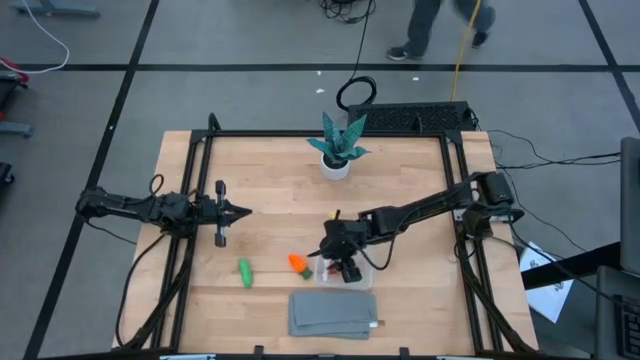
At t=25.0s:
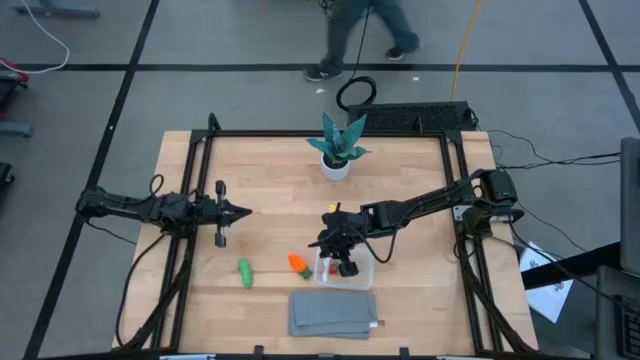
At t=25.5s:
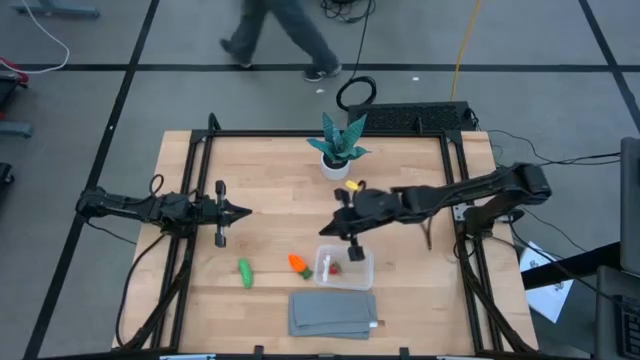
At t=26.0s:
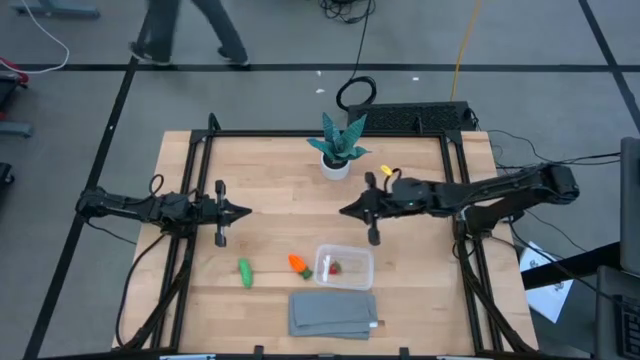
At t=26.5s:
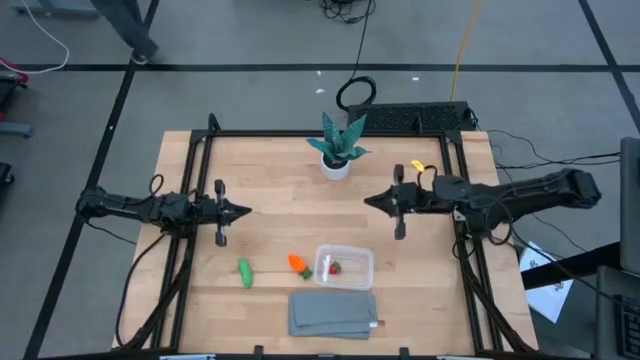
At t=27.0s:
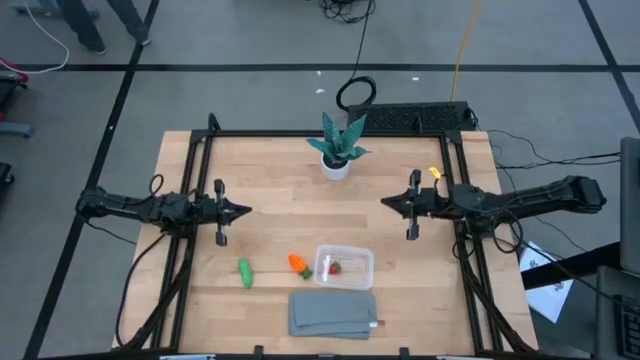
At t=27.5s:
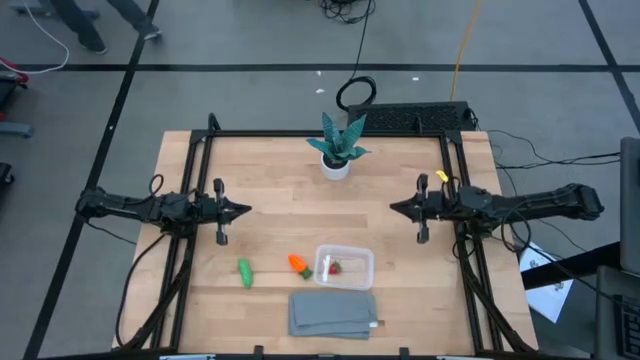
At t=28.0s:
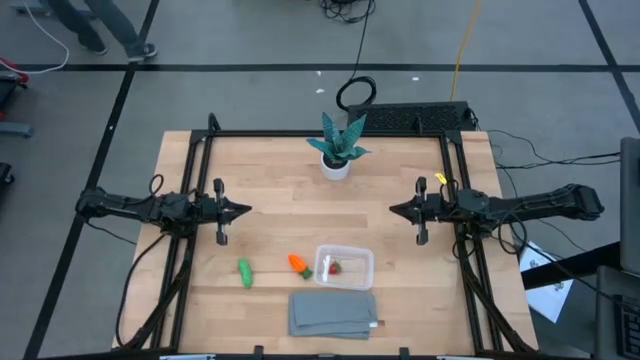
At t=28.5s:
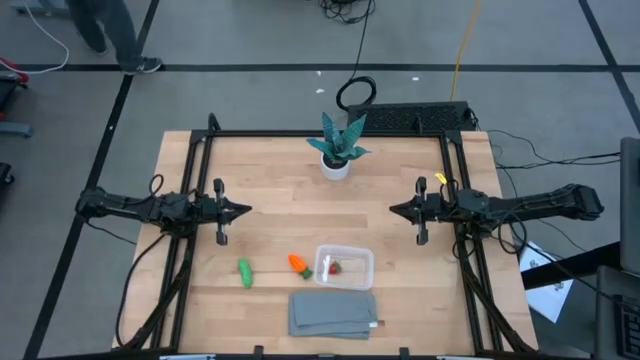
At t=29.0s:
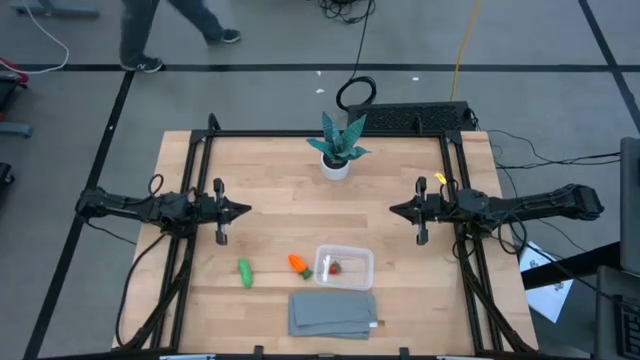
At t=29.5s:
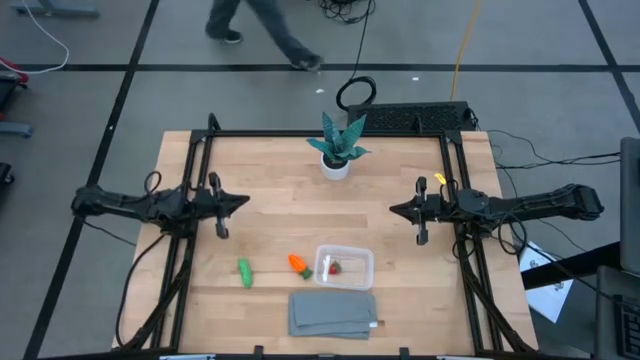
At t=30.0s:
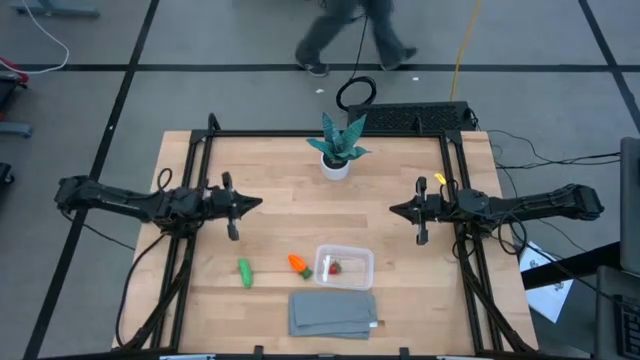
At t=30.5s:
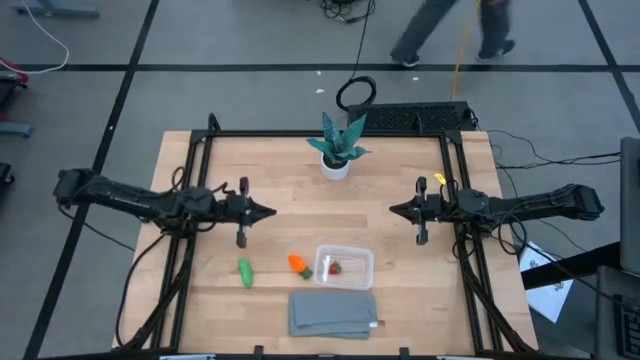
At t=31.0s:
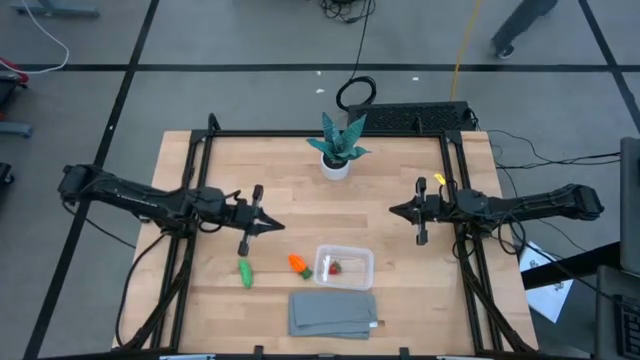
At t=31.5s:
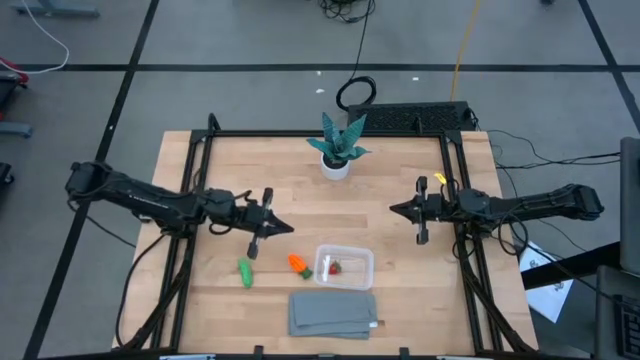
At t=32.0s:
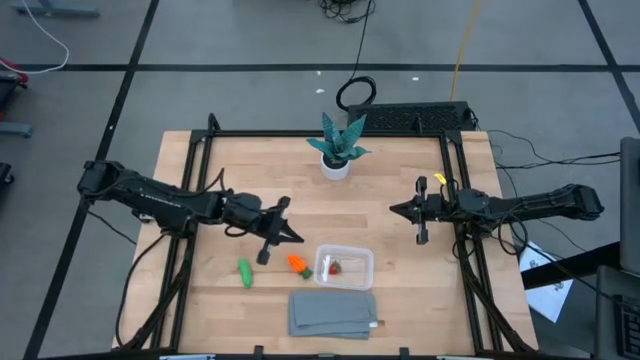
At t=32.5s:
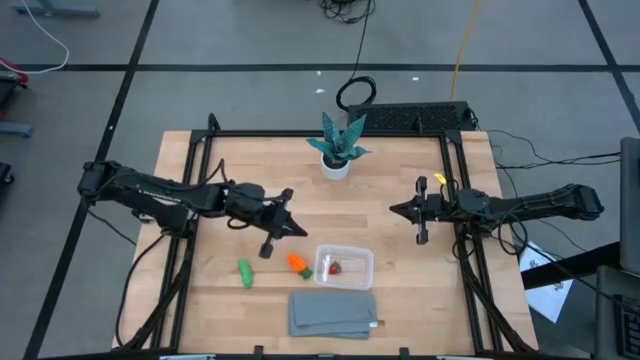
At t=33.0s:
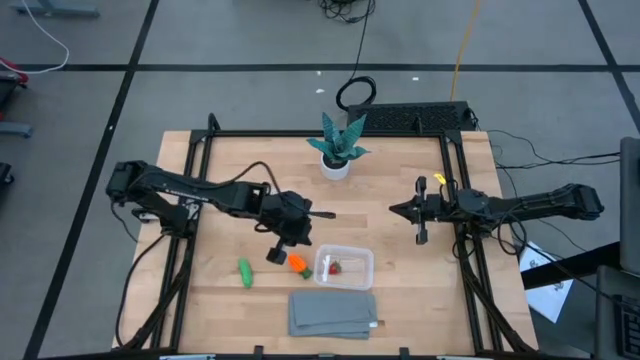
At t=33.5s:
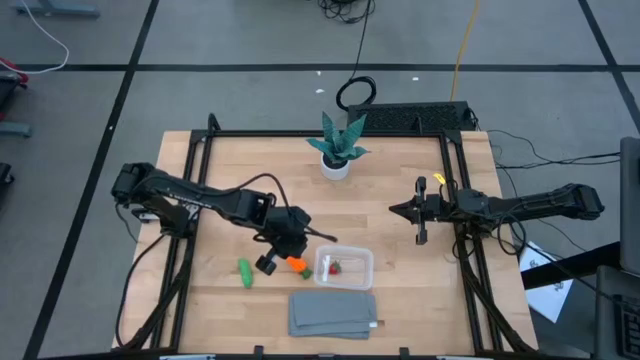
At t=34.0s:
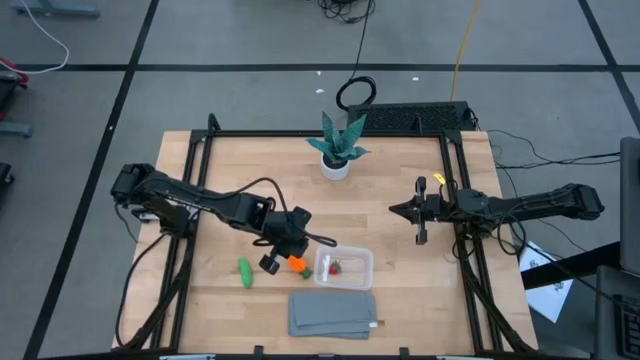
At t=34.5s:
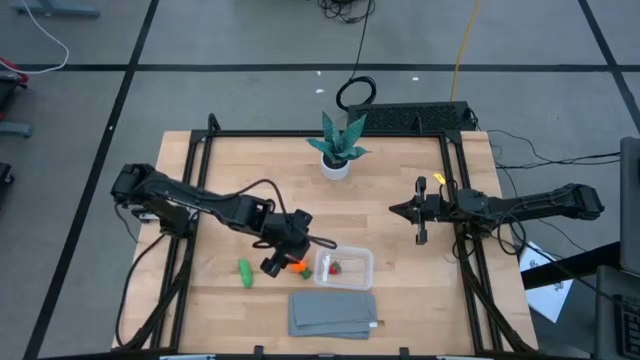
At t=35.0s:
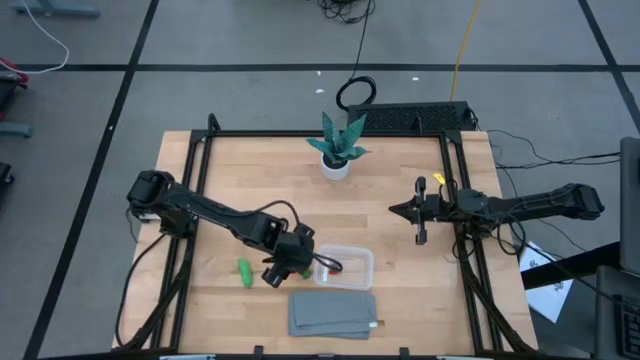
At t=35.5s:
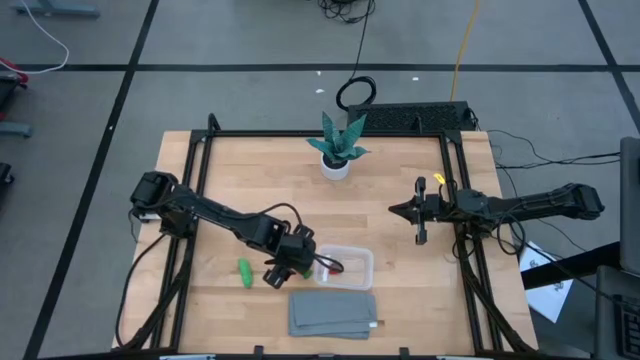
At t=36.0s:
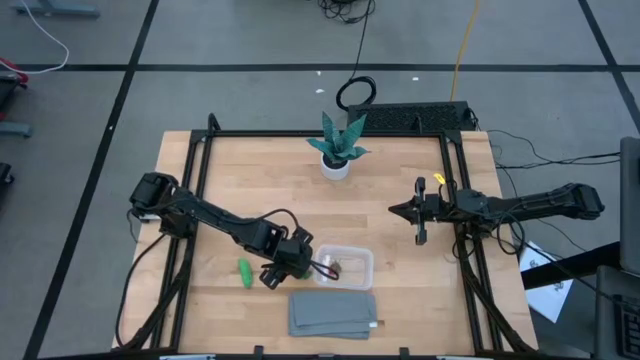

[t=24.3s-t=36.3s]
Task: Pick and placing Produce into tupperware
Put the orange carrot into the container

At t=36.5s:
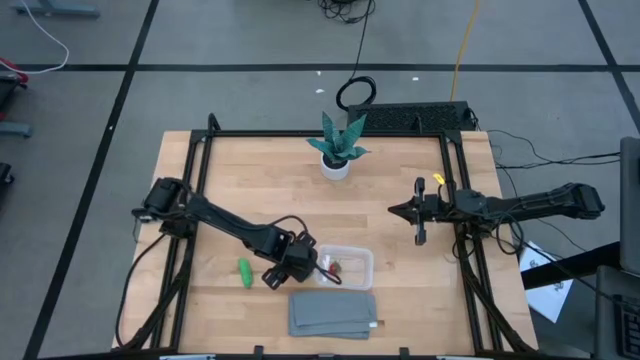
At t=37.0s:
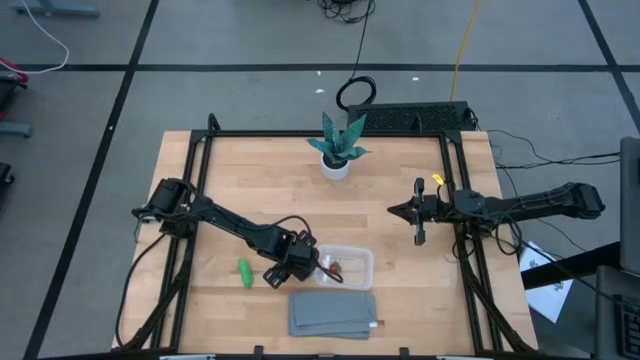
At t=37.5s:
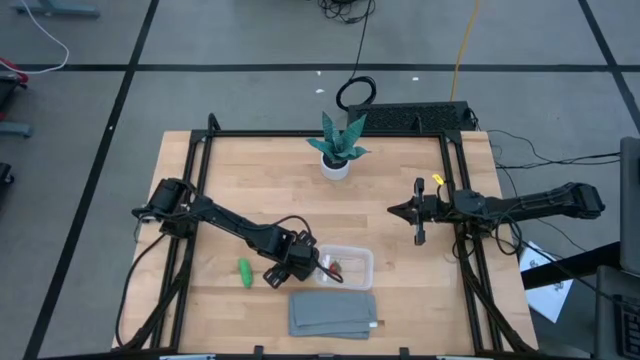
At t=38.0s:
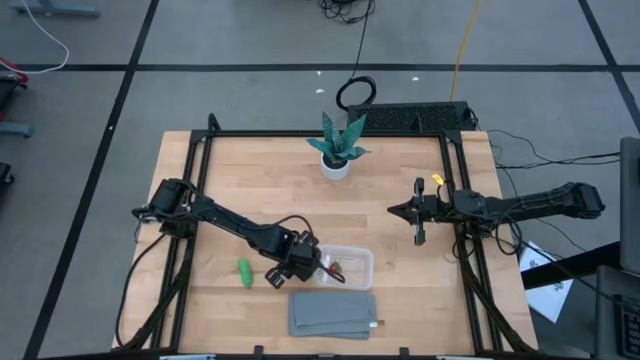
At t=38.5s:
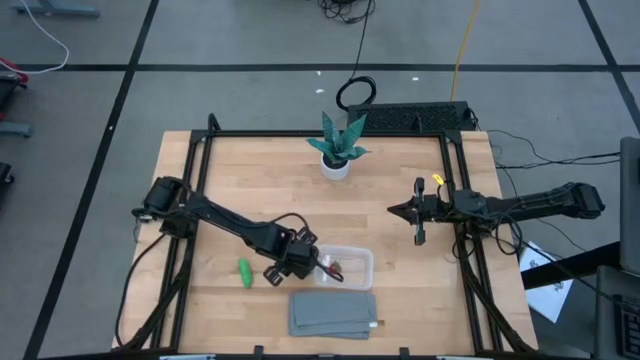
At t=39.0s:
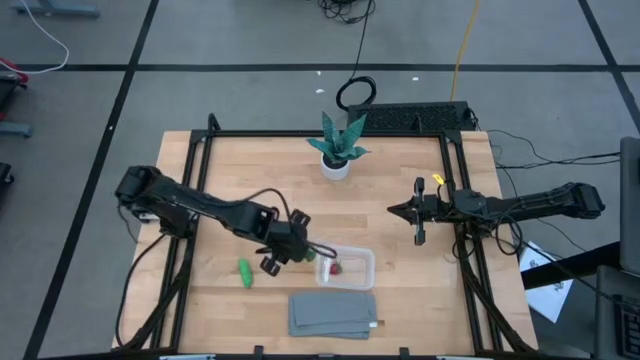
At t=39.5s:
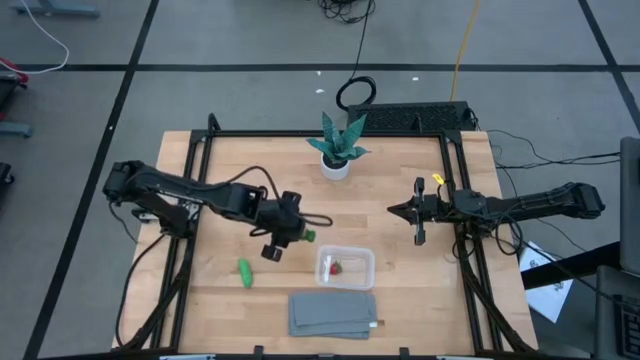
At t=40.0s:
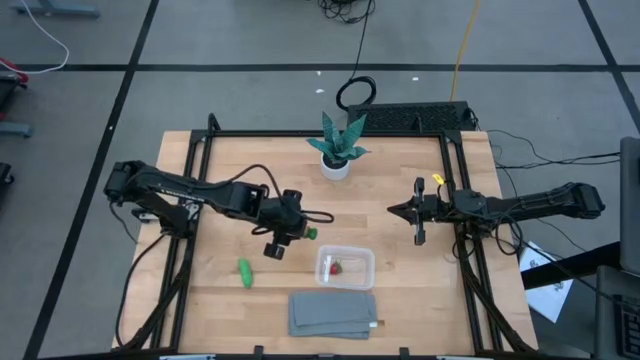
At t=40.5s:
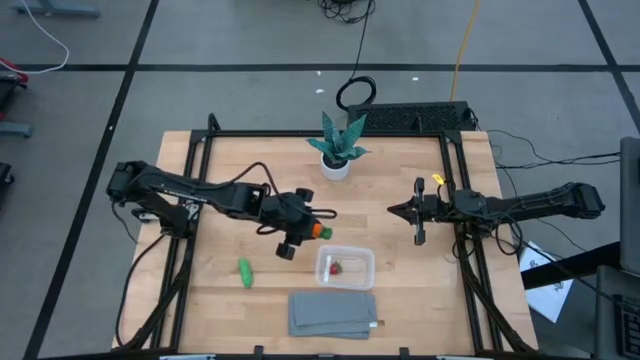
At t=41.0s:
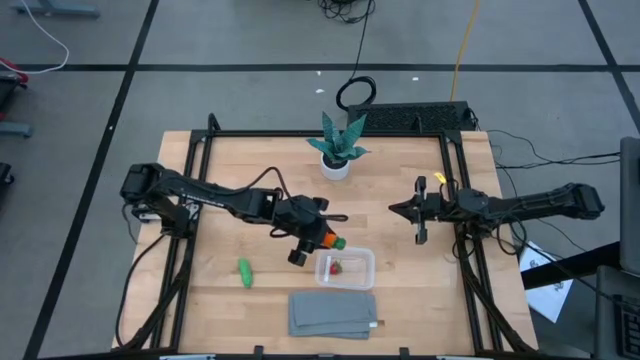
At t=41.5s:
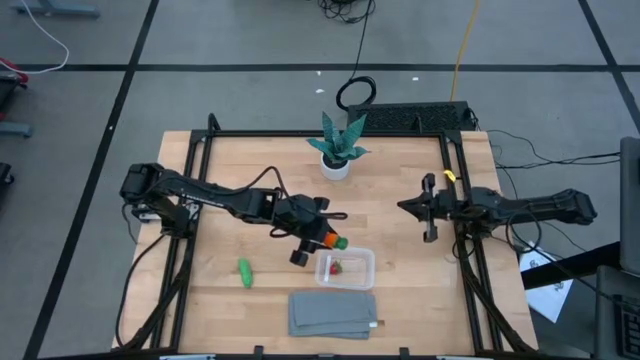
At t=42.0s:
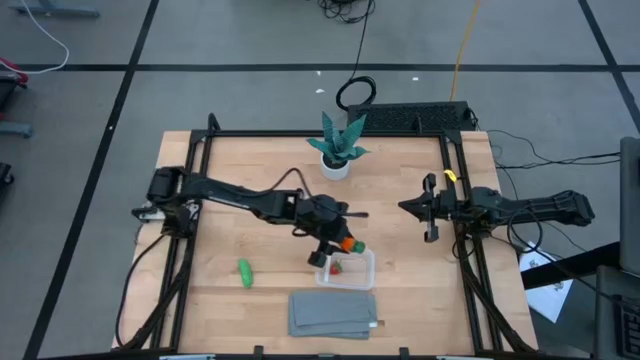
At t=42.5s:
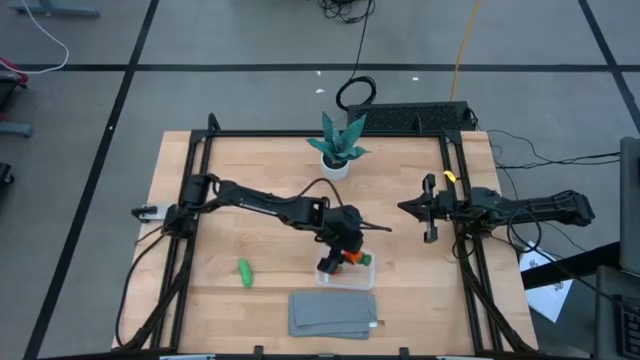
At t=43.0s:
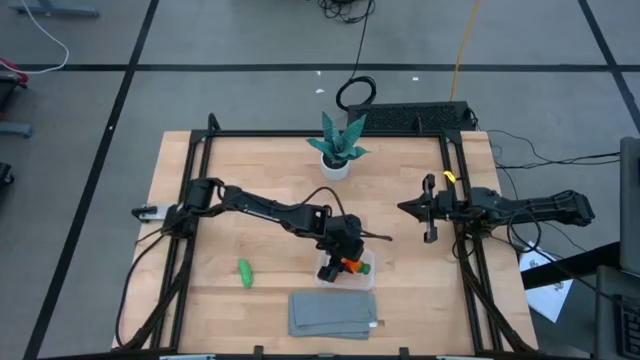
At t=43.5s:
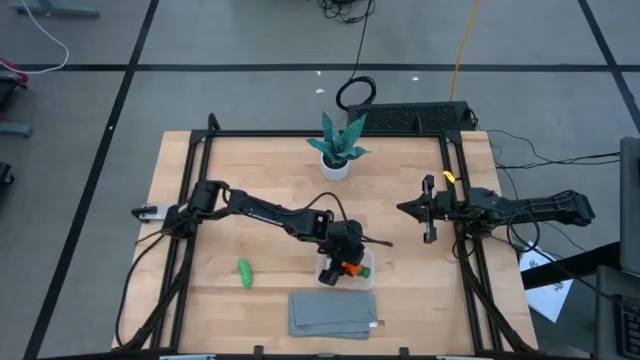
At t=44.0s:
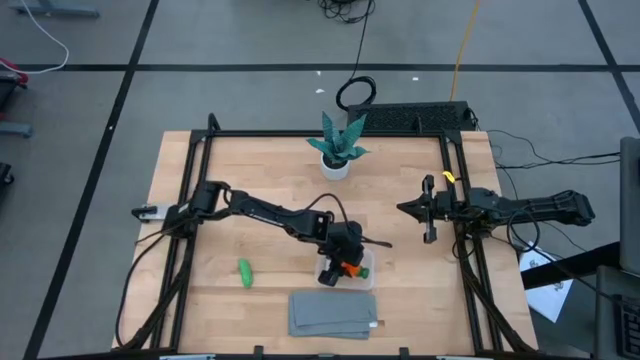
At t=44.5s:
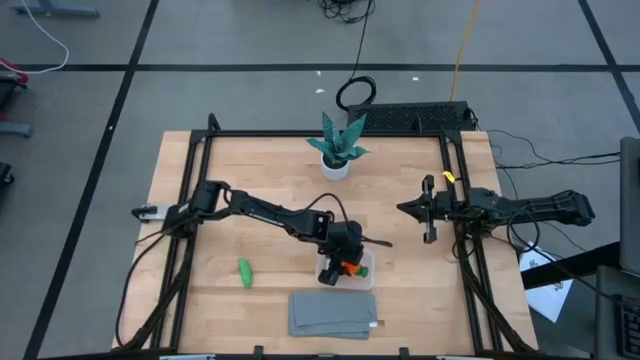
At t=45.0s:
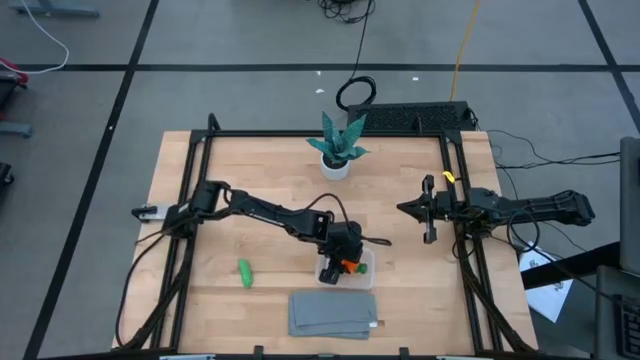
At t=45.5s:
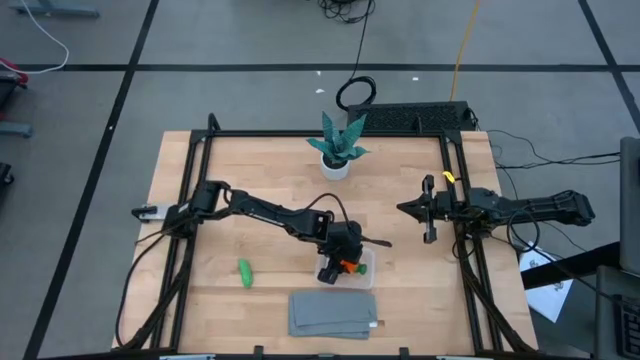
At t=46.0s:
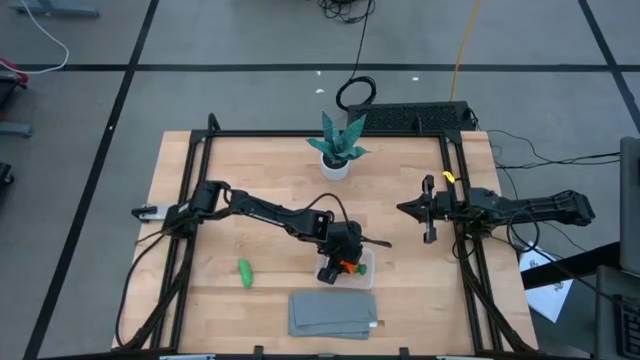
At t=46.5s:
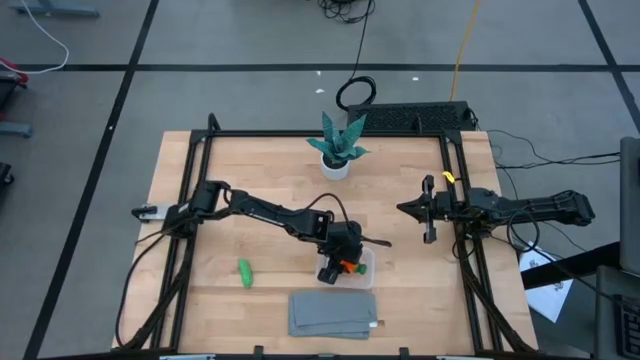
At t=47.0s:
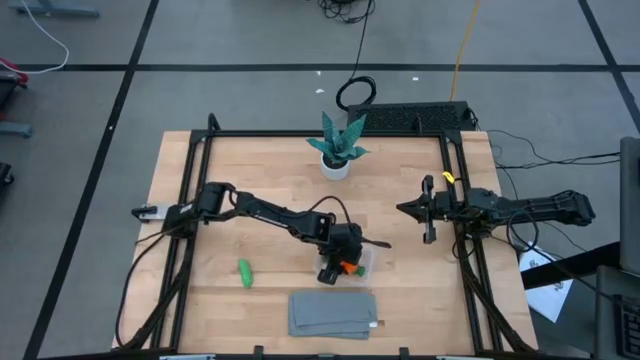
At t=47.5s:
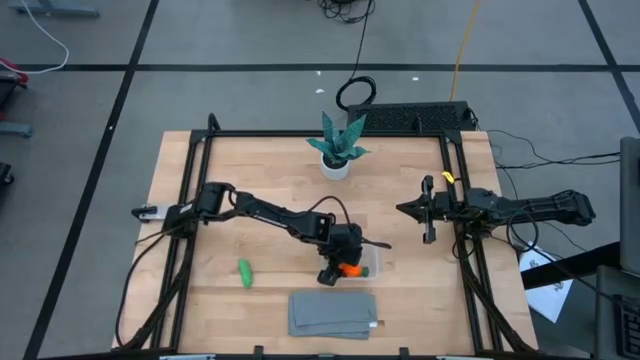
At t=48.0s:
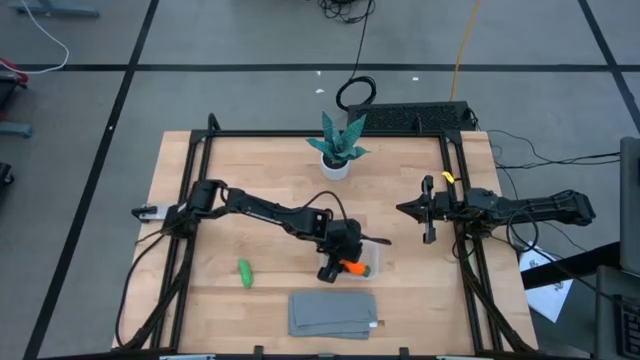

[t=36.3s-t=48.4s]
Put the orange carrot into the container
